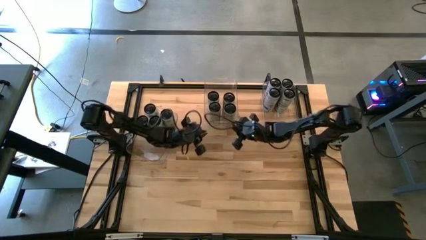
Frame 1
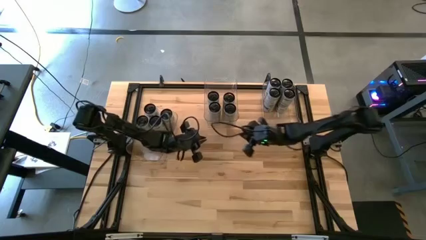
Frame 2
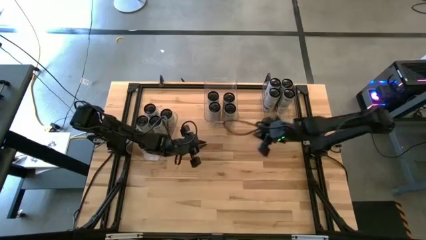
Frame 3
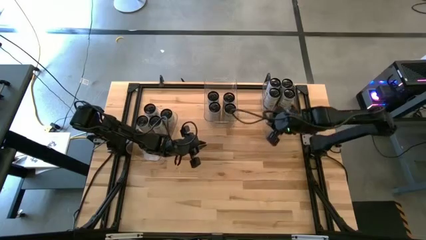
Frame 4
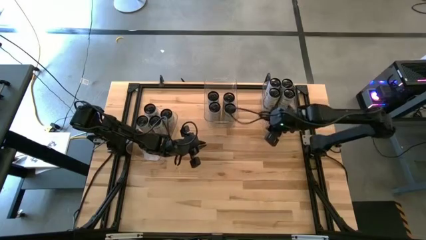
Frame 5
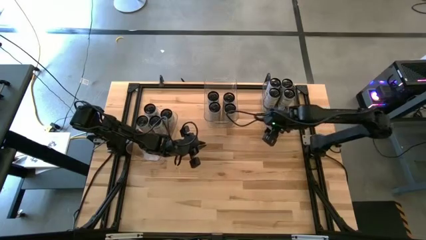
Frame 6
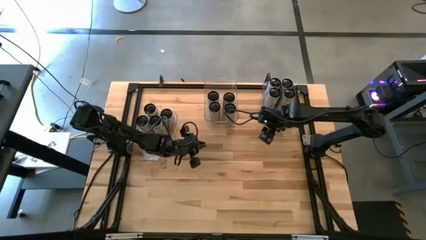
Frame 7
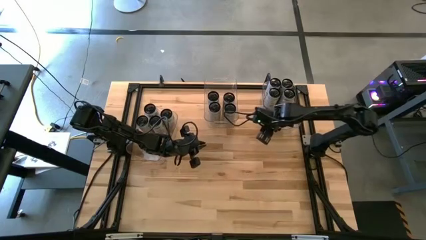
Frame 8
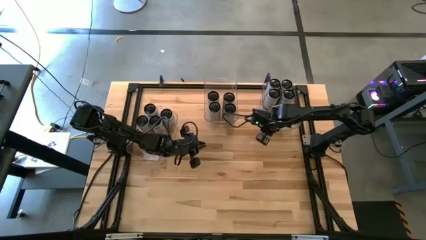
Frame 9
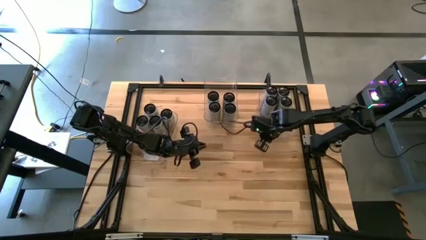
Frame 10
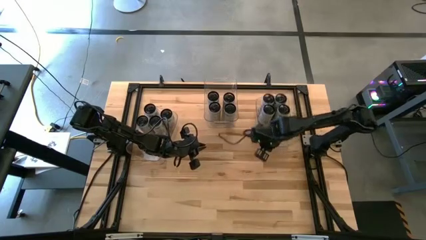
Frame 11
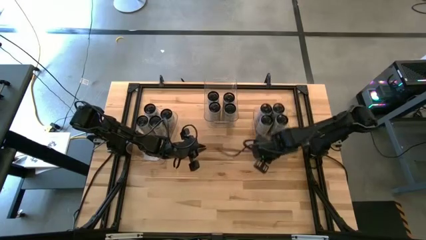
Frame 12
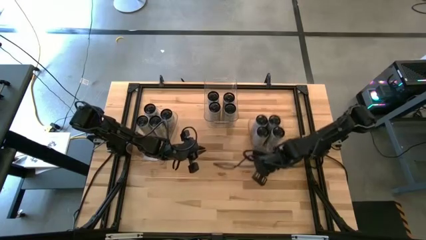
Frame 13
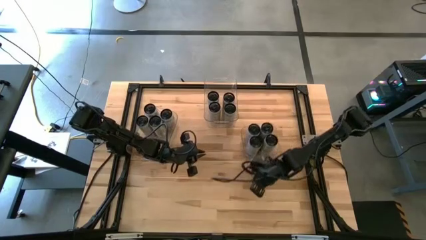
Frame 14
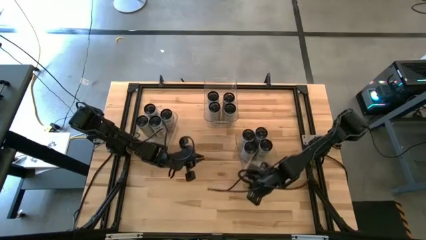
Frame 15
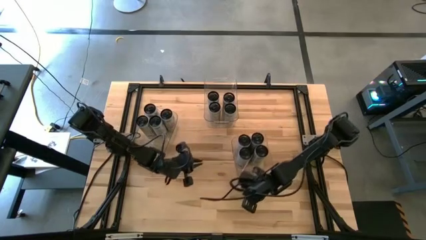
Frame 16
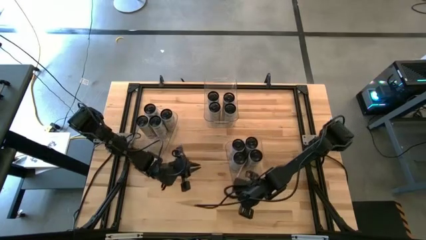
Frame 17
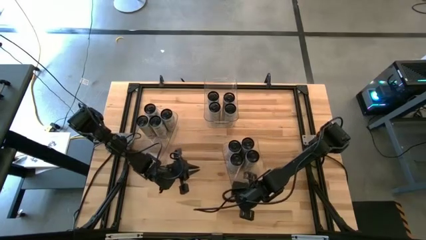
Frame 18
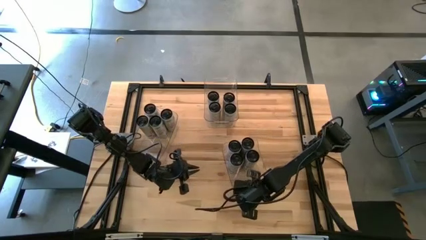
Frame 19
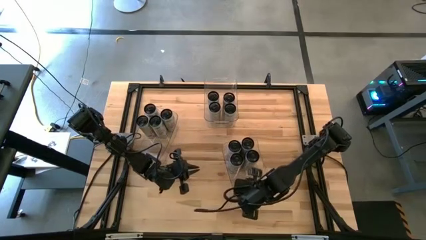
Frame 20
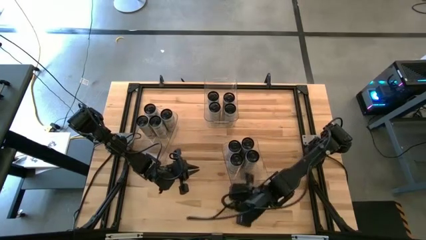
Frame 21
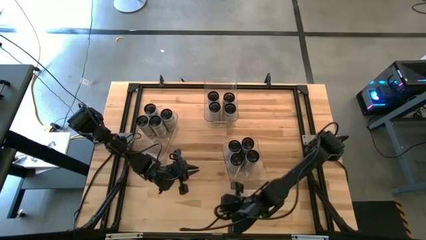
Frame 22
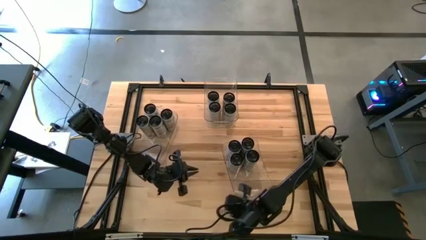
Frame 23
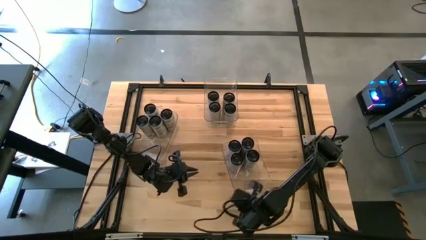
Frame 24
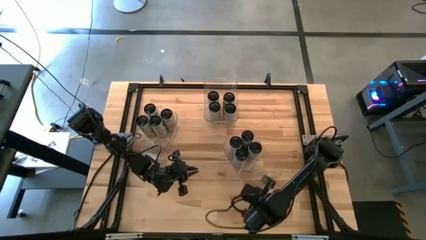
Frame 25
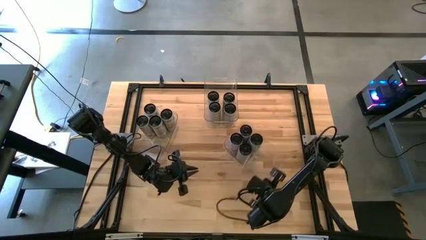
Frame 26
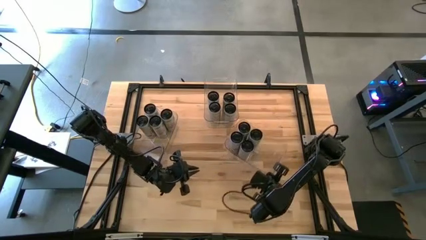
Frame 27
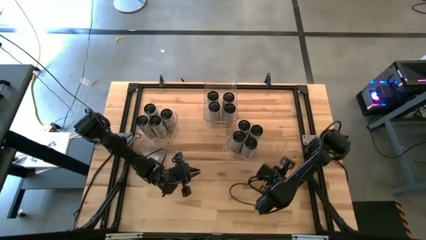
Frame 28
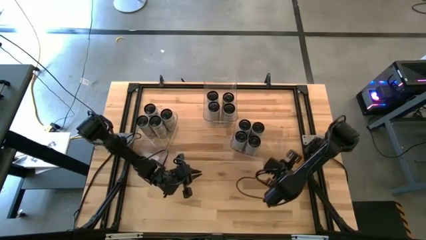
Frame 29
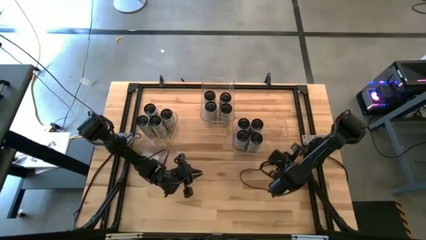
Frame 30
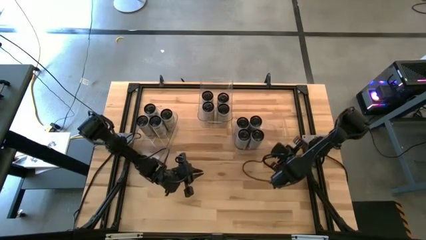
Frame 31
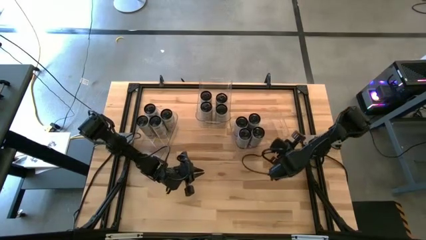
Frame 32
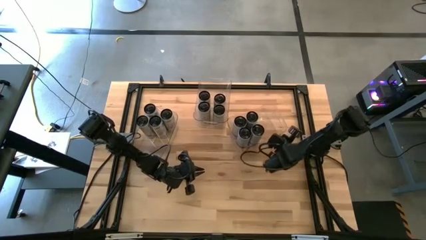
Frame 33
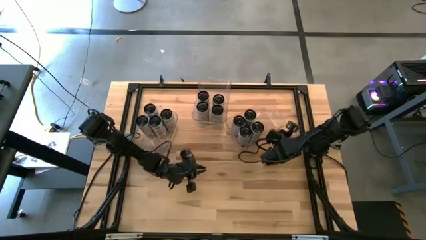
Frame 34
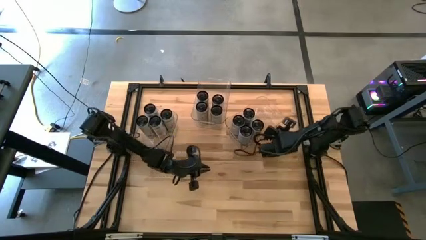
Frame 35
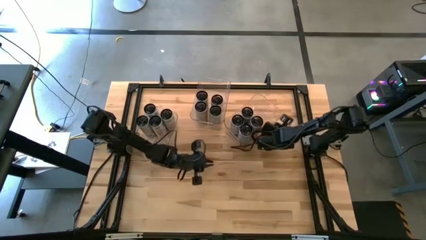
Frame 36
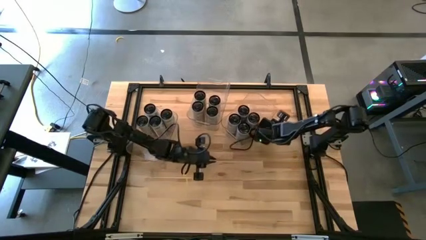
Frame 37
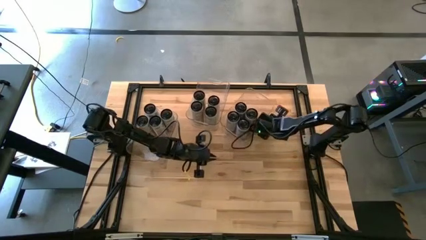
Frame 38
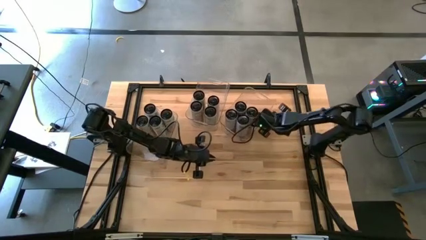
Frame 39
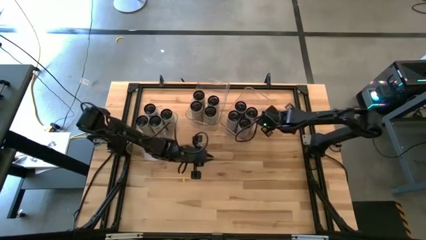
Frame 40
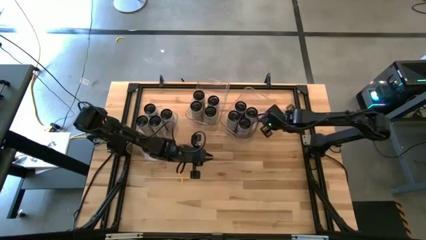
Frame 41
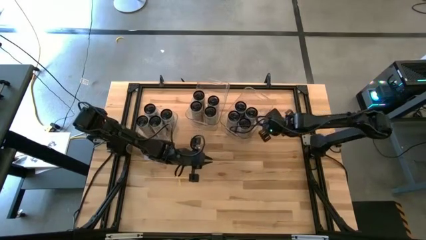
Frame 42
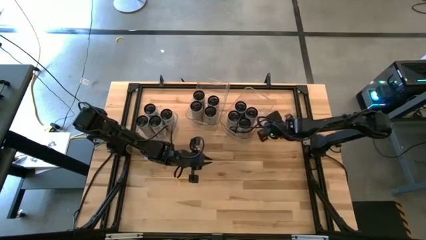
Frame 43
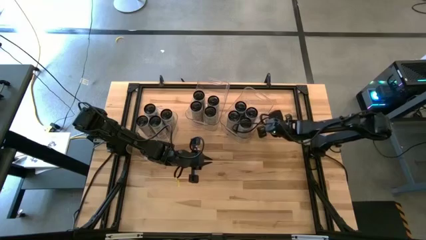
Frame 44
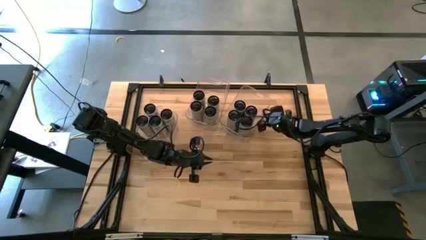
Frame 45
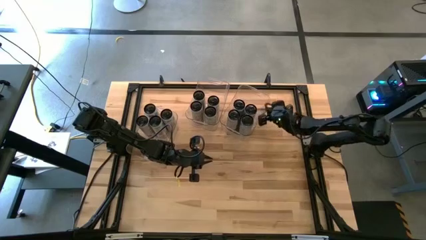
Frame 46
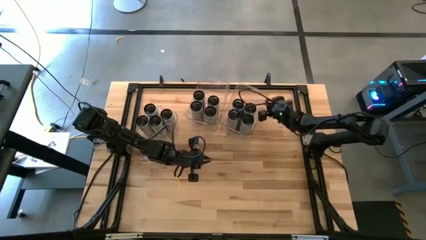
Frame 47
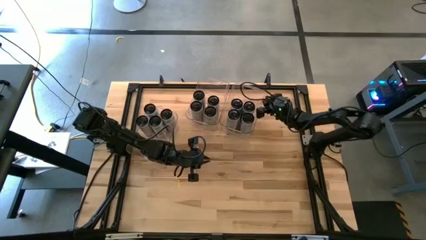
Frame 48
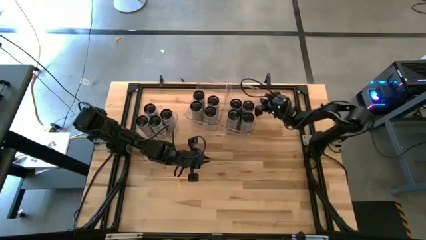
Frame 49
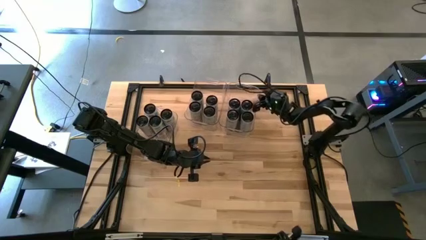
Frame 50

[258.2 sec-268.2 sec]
Task: Sort soda cans
Adjust the right transparent bin

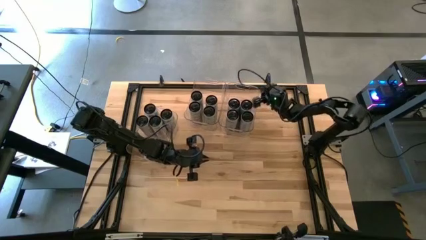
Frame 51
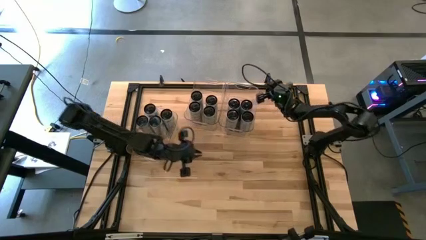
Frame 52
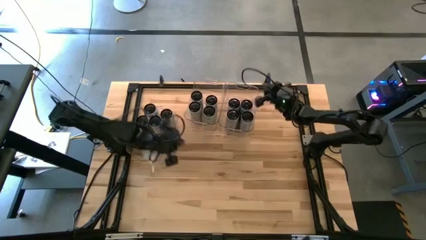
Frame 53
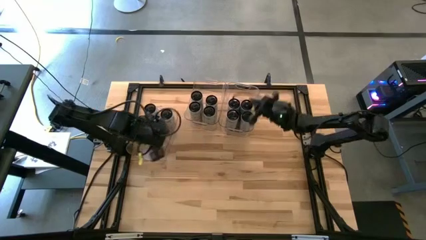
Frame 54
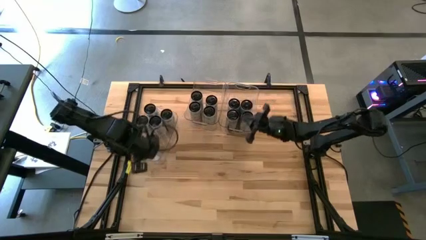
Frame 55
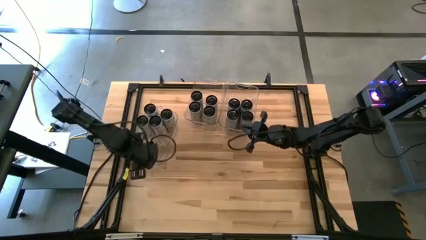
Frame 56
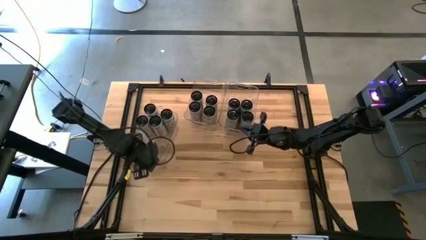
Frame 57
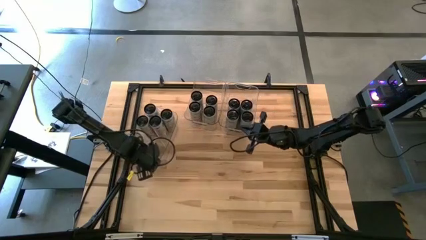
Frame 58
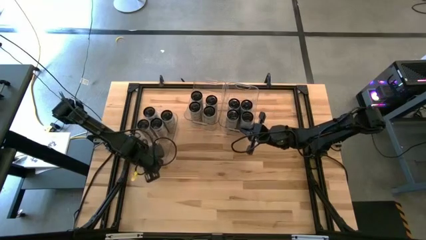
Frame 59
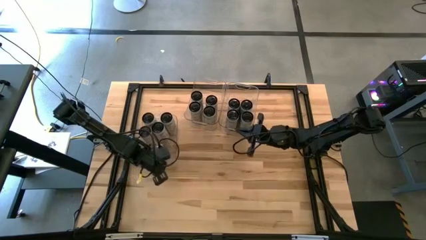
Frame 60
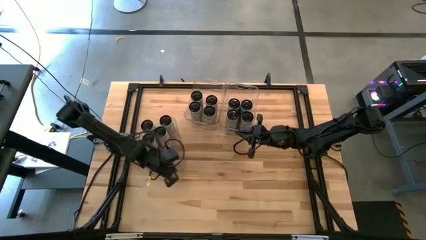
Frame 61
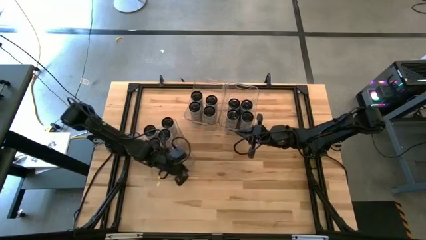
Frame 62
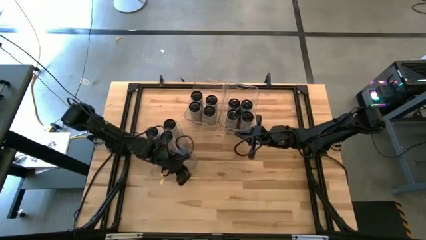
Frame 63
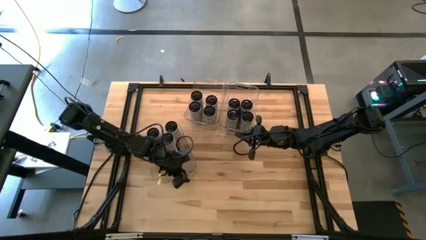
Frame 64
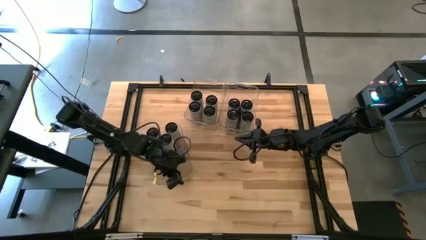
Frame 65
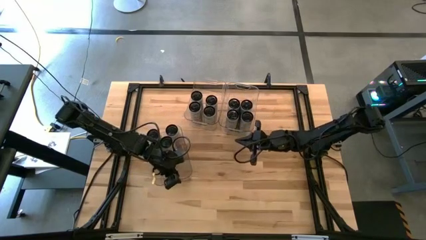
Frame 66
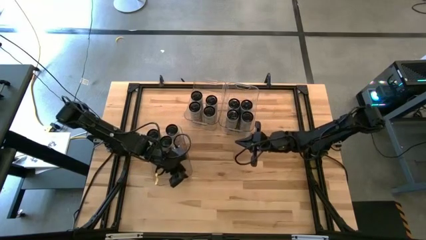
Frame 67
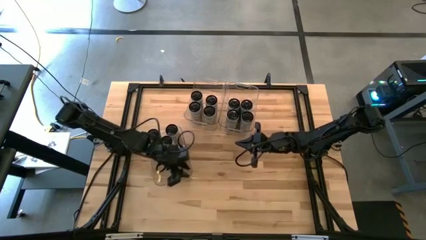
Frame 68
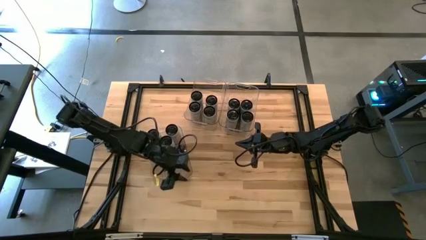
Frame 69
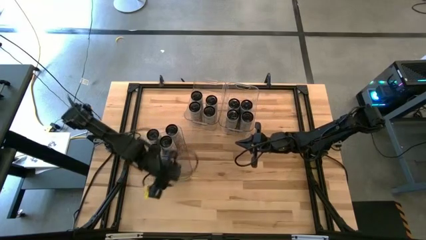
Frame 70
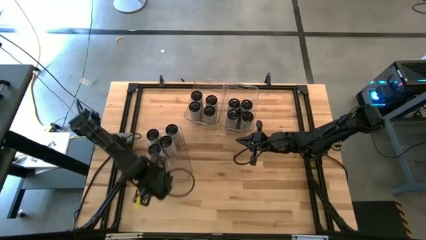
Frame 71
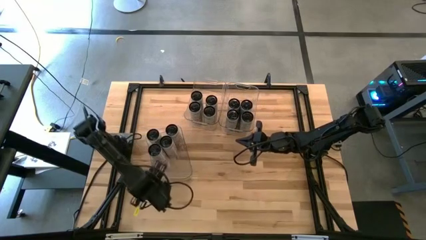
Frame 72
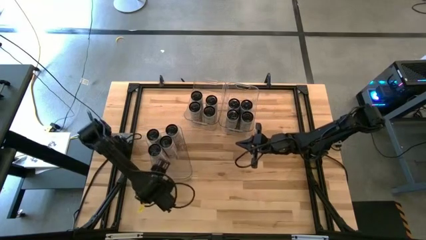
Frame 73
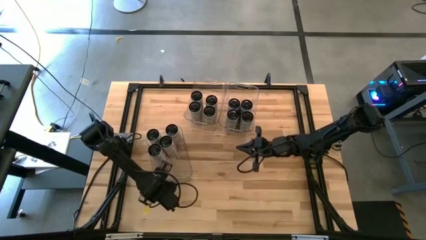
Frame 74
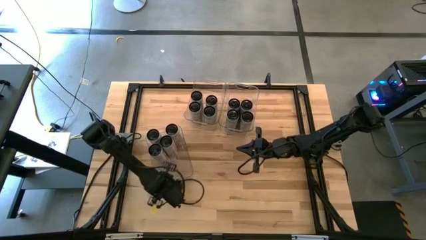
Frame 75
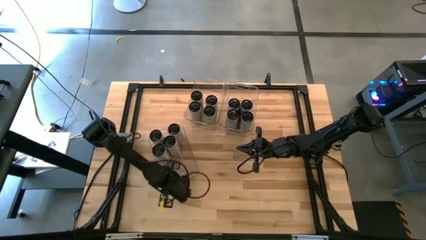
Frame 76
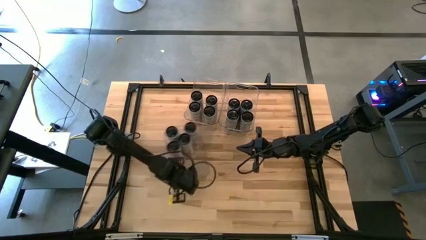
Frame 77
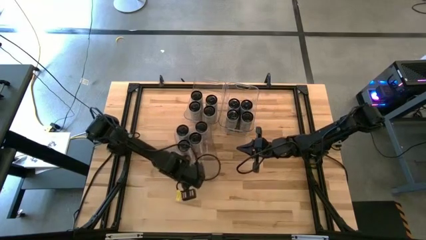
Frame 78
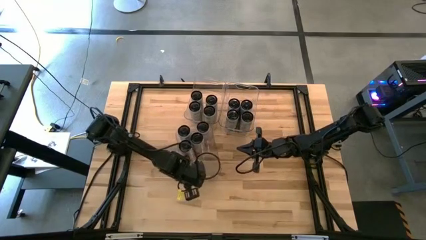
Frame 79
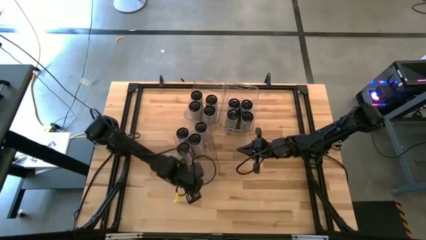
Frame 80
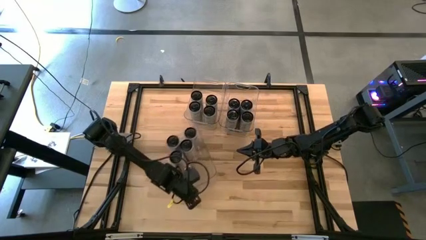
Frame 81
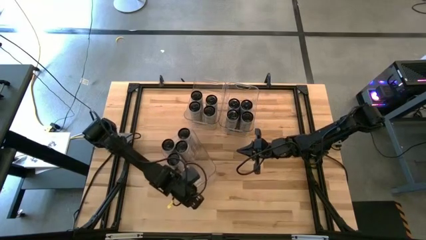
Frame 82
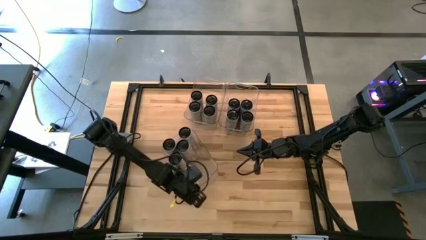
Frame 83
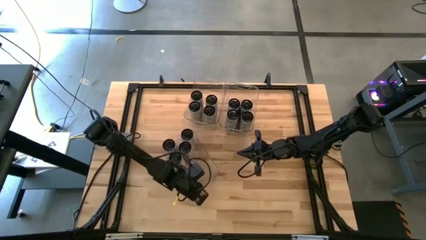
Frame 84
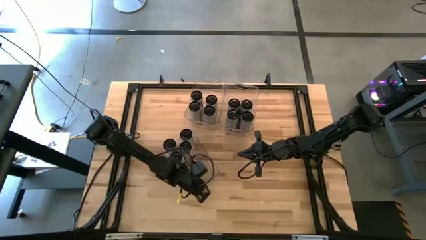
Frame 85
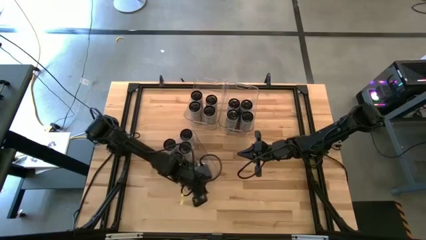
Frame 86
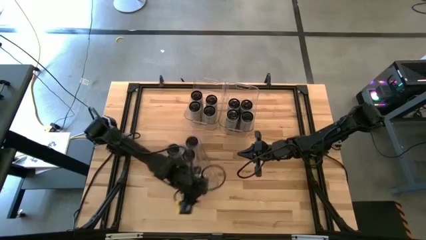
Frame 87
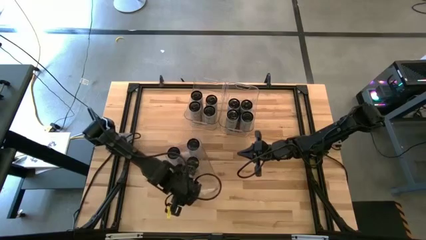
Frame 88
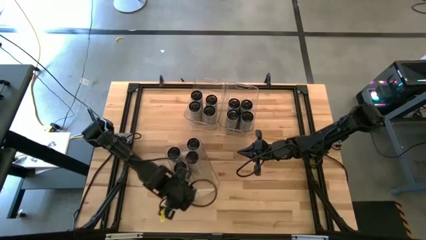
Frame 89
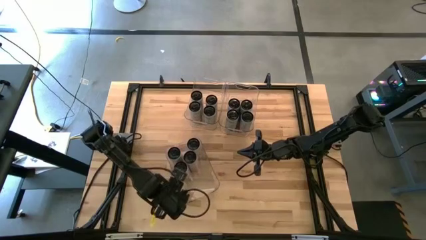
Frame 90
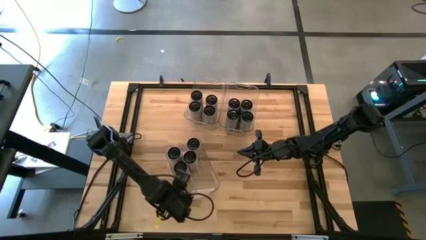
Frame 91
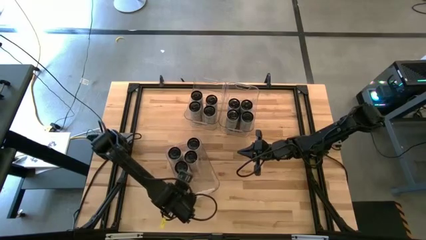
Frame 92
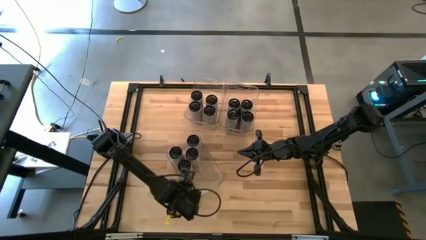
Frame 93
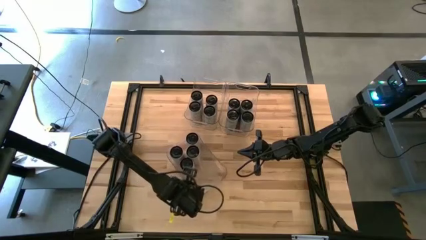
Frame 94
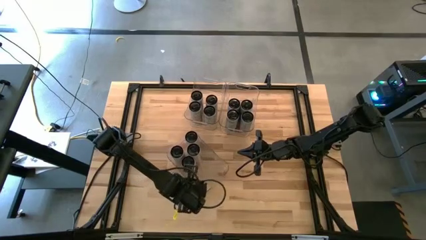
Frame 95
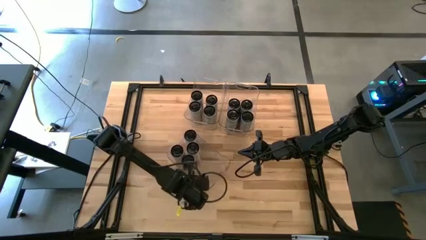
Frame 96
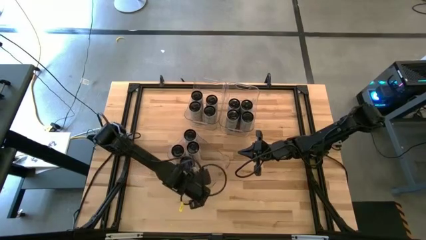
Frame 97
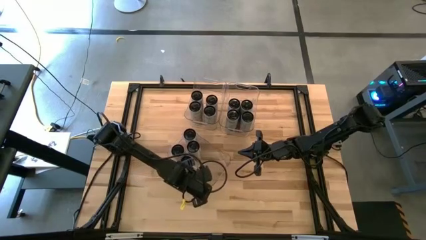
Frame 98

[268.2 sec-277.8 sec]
Move the left transparent bin to the center of the table
